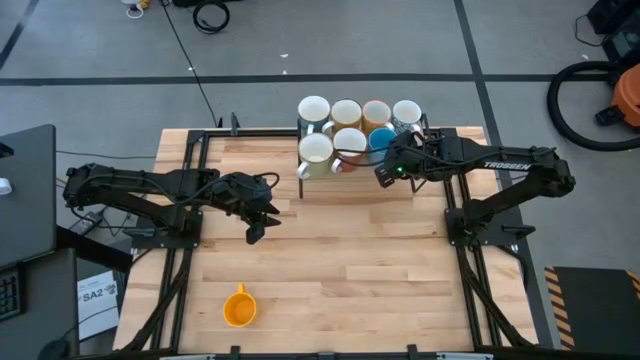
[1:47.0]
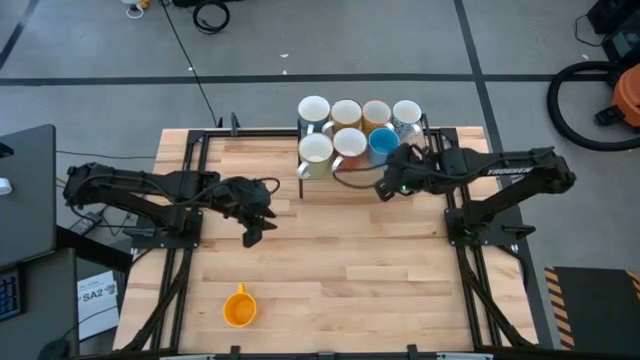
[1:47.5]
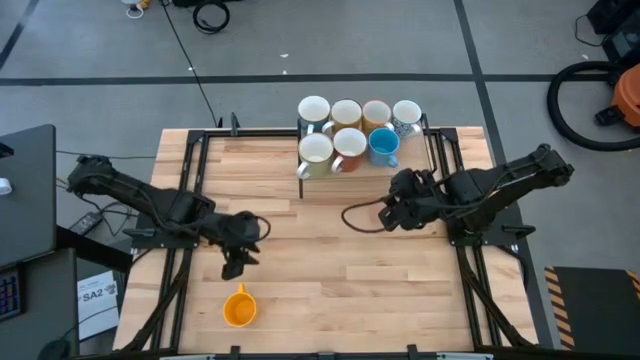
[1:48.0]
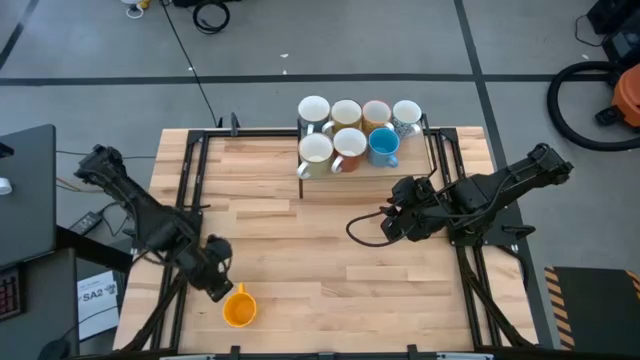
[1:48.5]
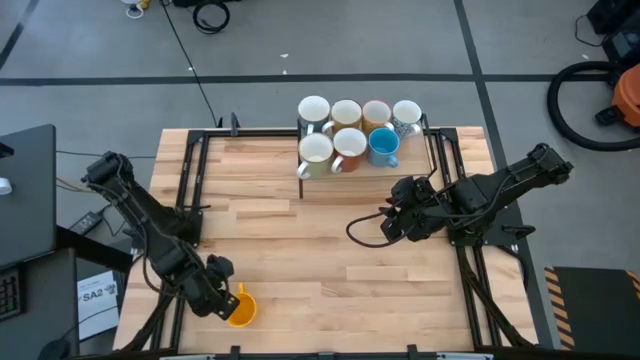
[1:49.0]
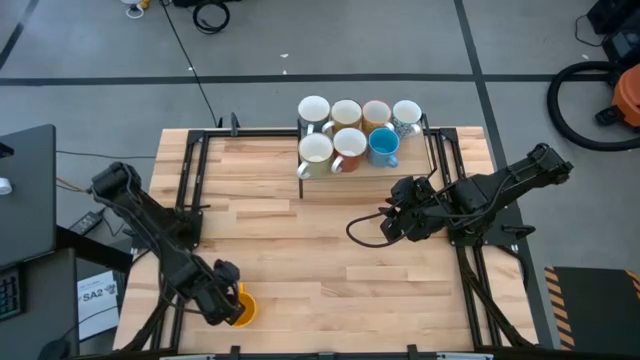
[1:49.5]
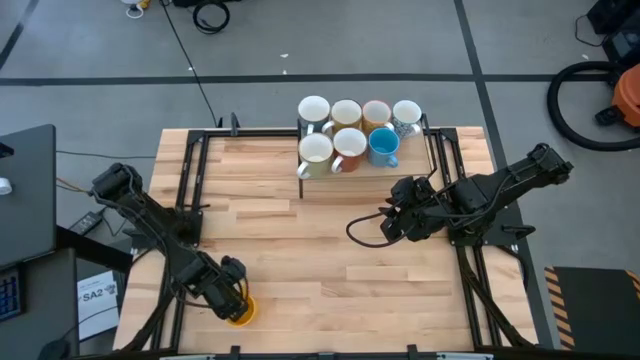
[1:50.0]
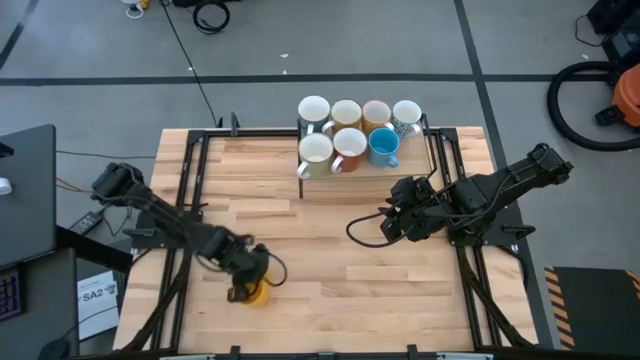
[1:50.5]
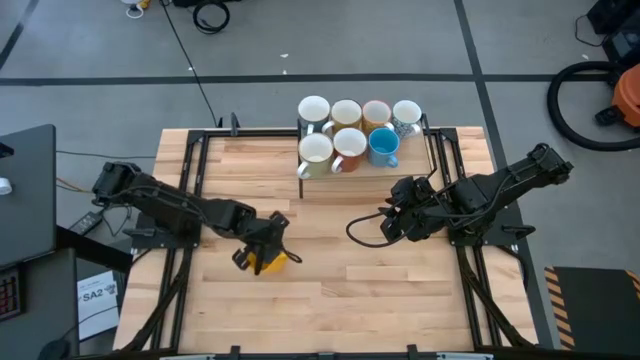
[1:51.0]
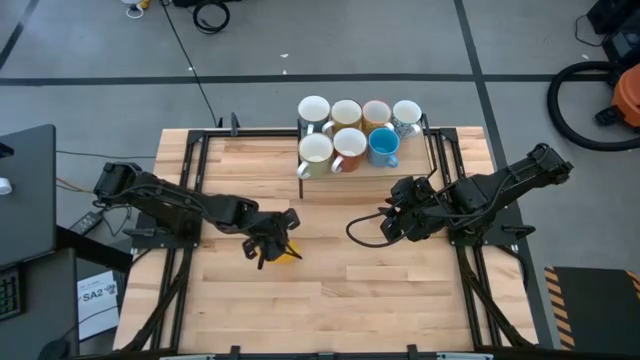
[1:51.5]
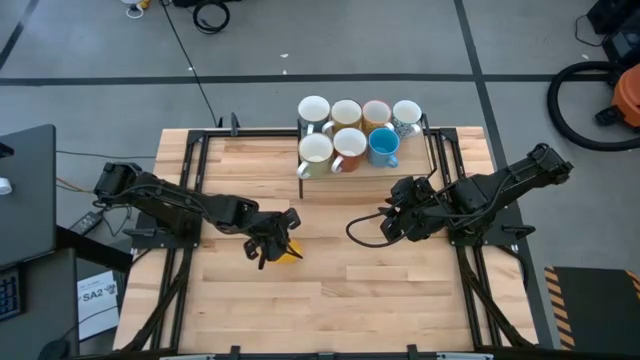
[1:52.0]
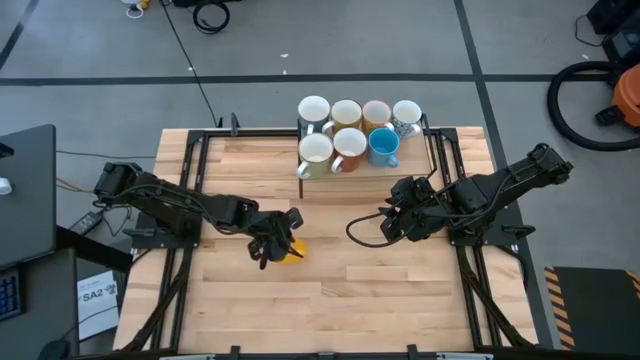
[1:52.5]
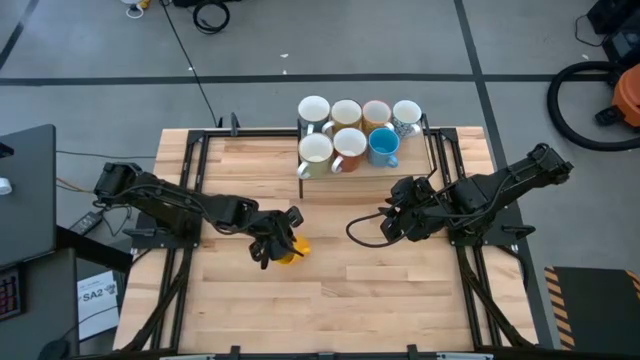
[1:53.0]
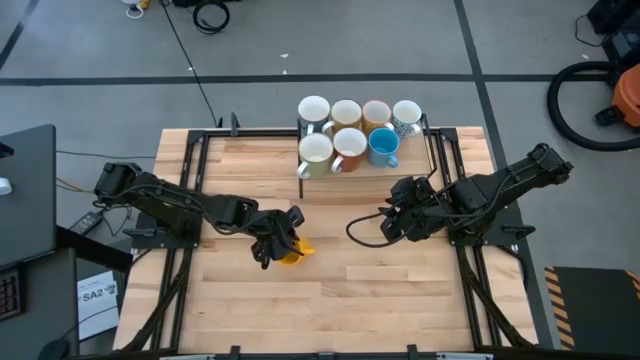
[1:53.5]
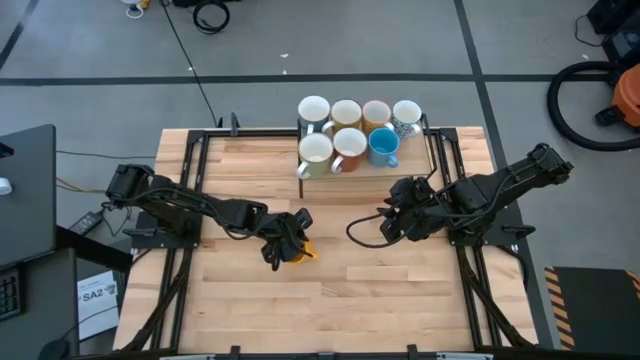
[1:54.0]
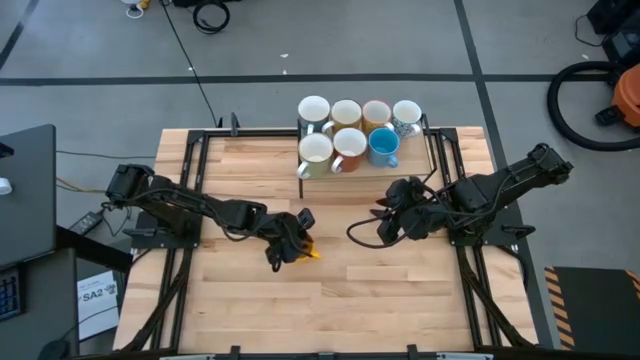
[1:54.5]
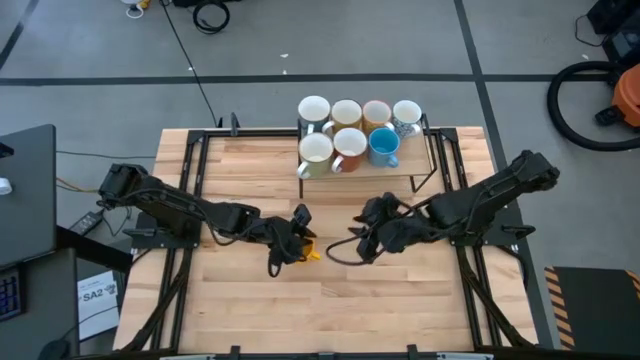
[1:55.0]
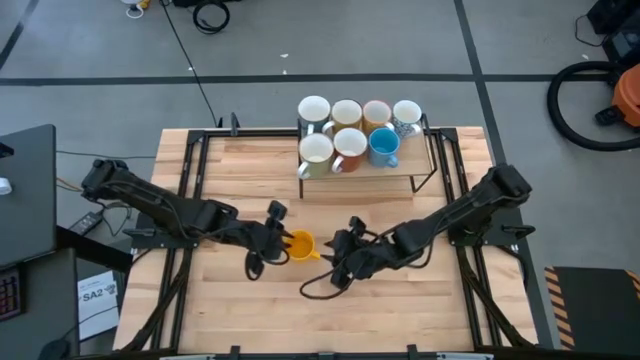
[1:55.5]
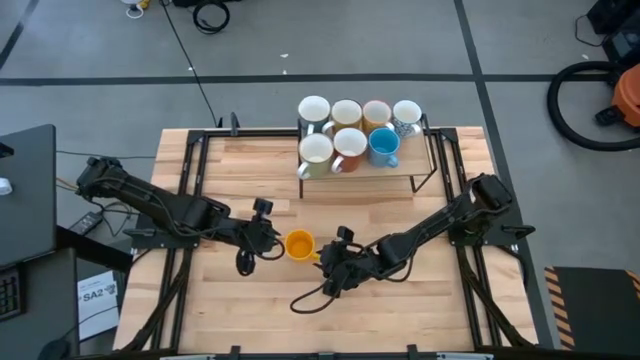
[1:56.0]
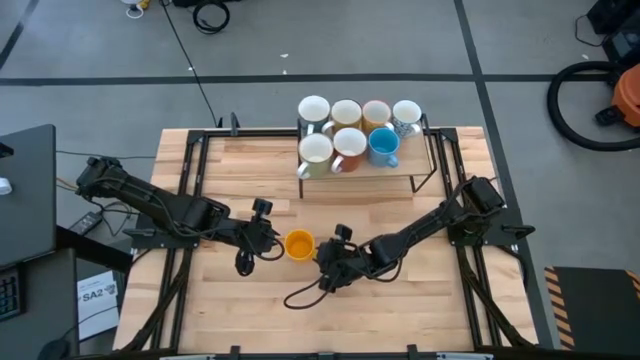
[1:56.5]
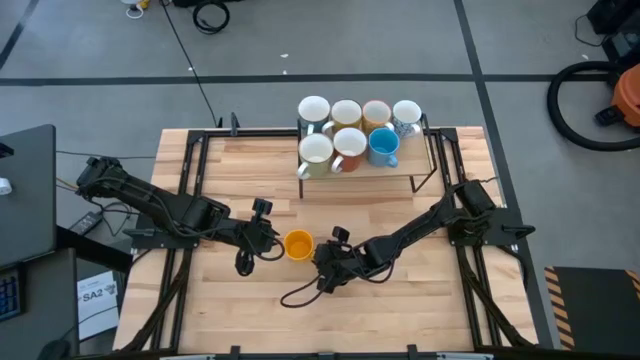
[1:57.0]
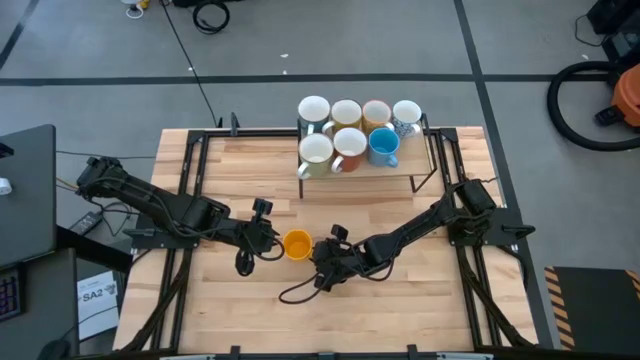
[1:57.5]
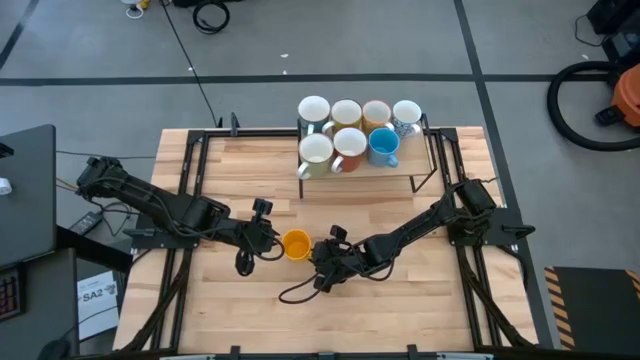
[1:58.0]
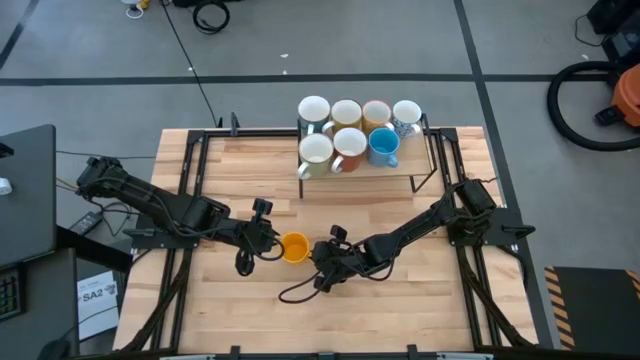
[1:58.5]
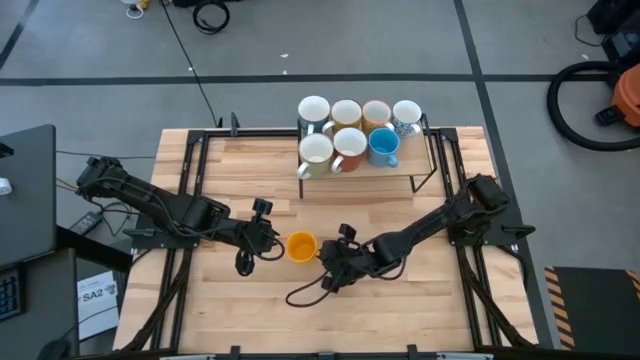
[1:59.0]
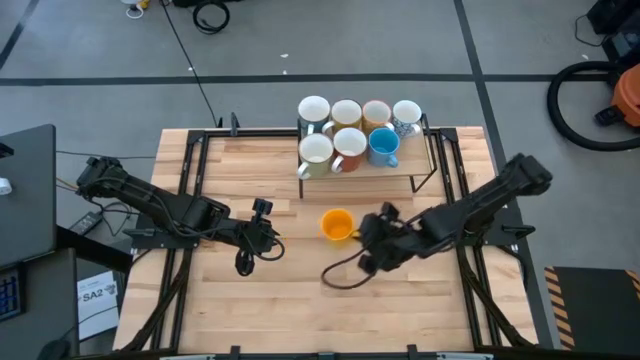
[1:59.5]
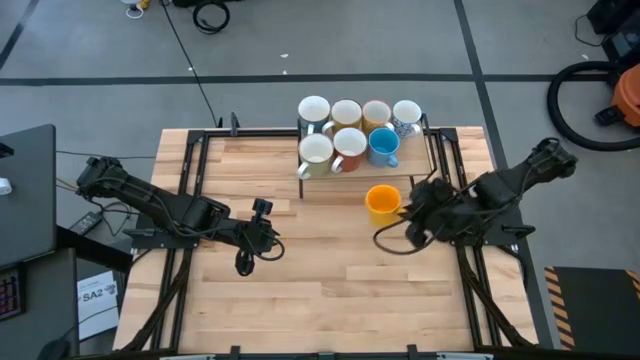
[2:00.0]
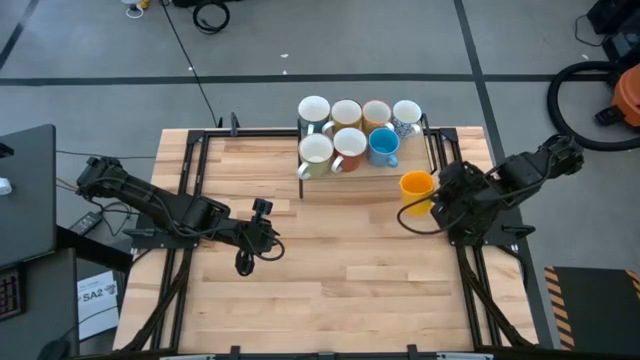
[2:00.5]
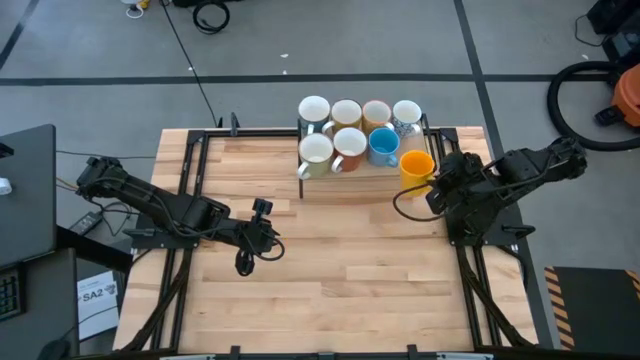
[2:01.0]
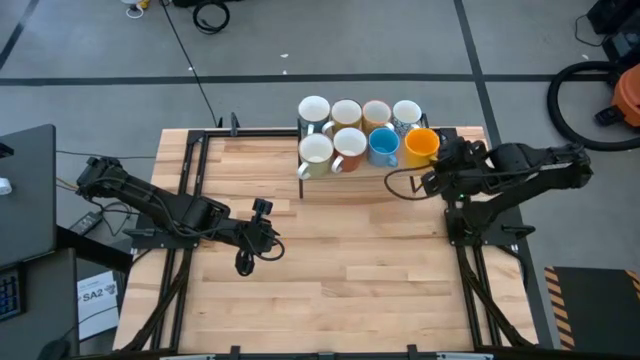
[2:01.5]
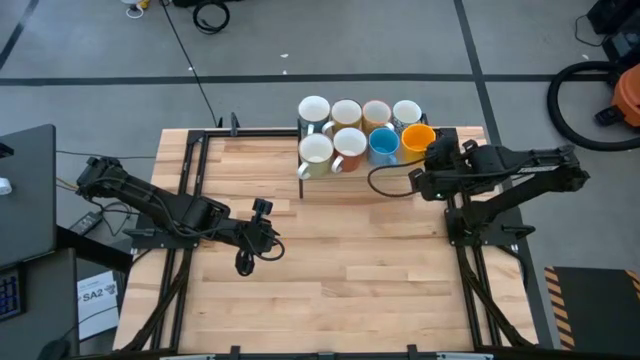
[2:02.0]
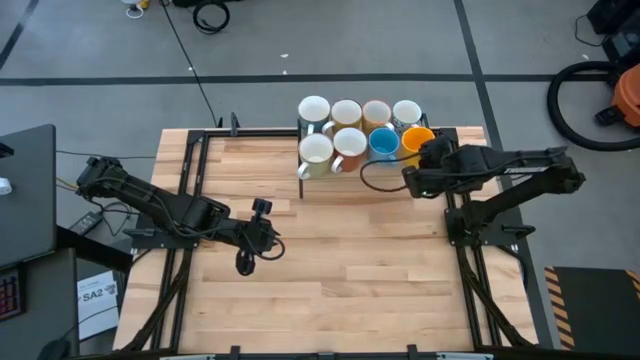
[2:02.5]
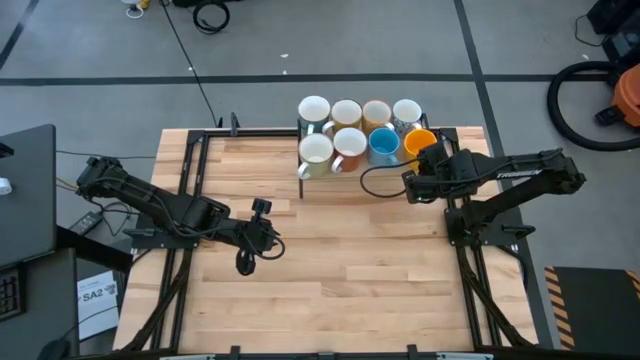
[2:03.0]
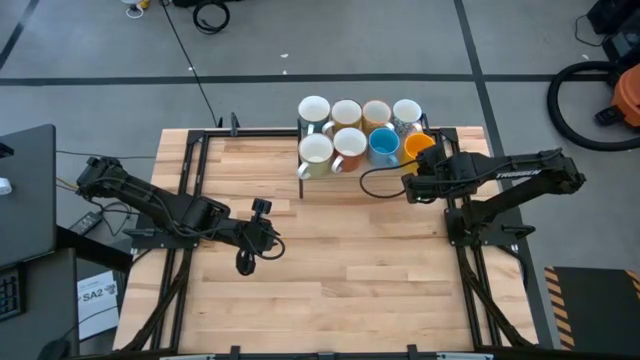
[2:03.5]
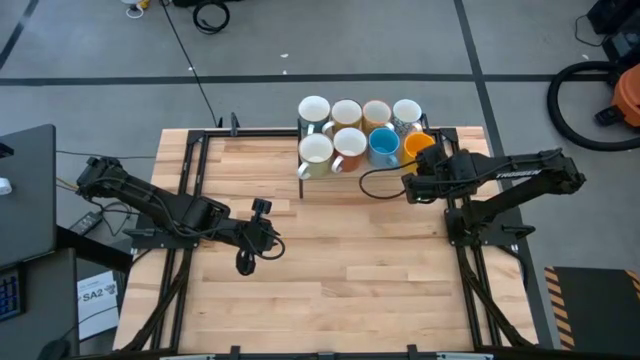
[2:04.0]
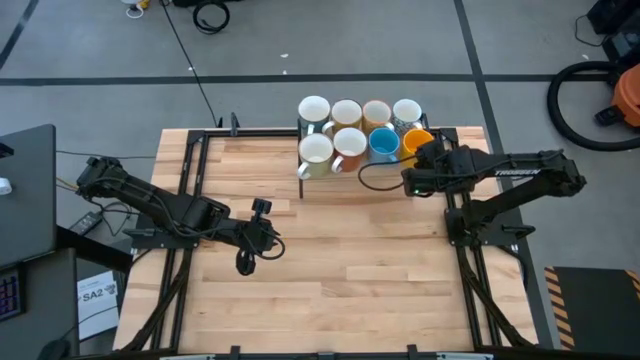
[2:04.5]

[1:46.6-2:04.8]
Task: Place coffee mugs
Put the yellow mug on the shelf

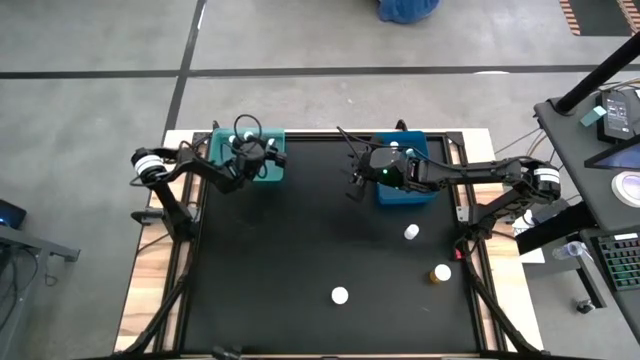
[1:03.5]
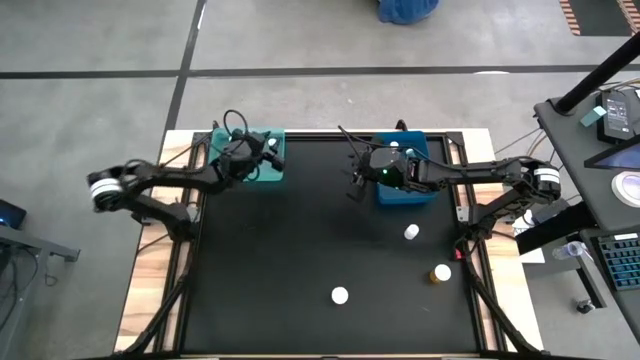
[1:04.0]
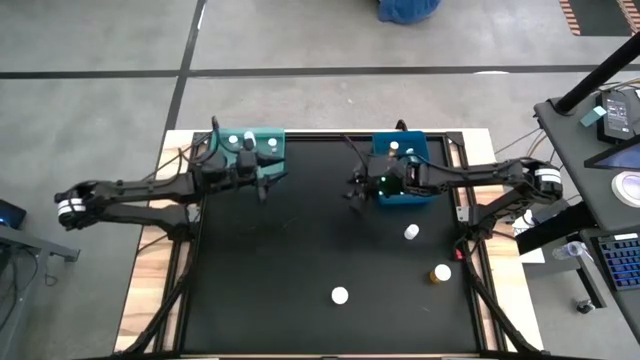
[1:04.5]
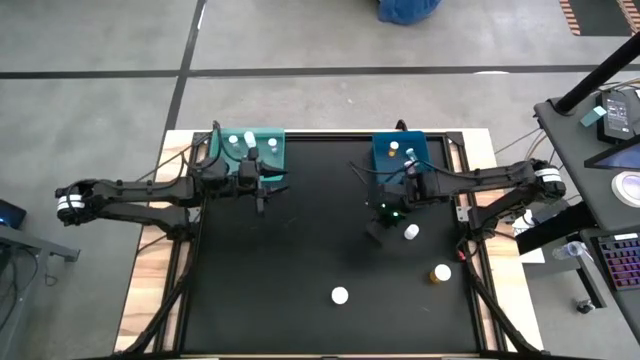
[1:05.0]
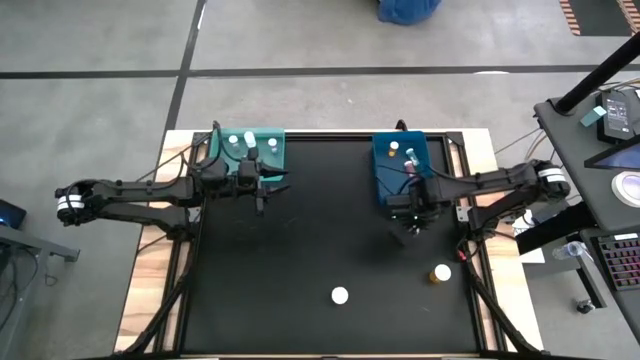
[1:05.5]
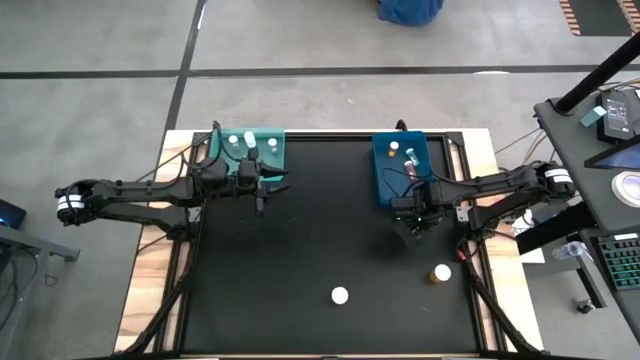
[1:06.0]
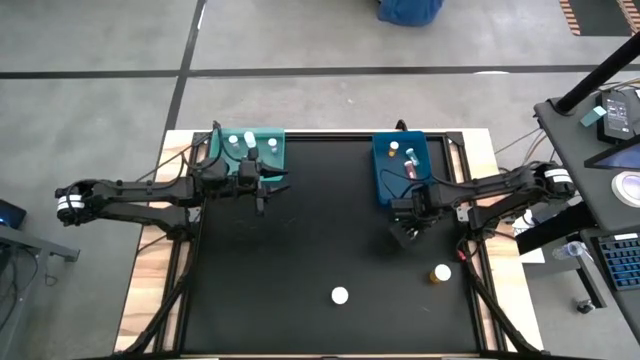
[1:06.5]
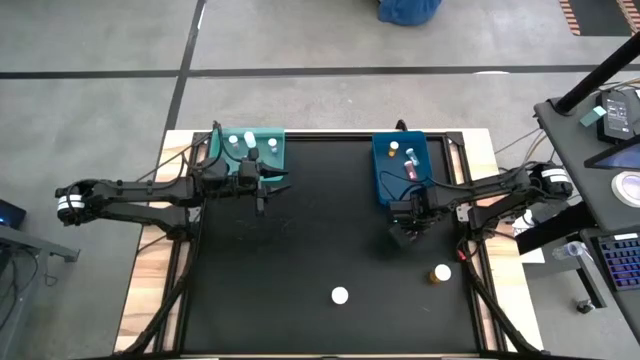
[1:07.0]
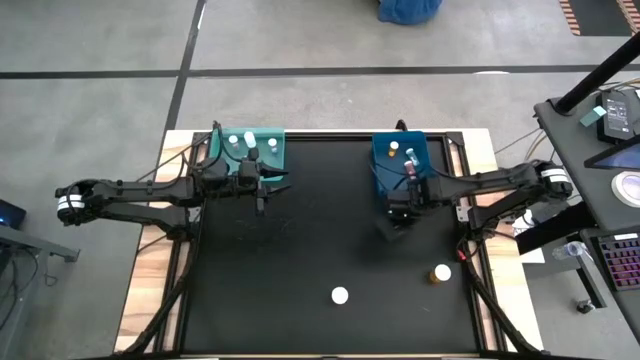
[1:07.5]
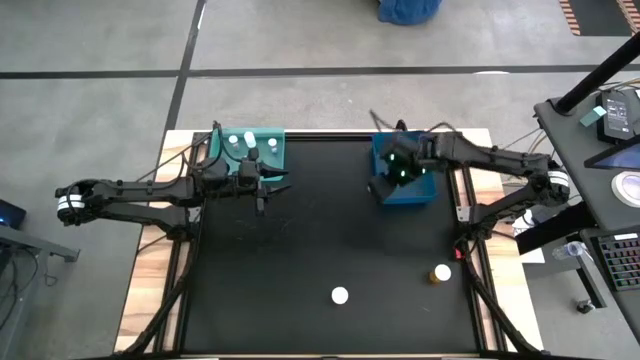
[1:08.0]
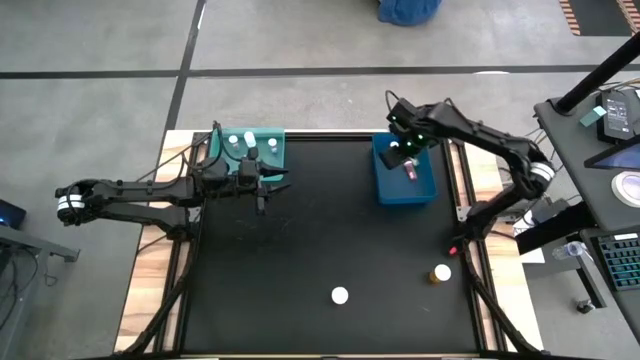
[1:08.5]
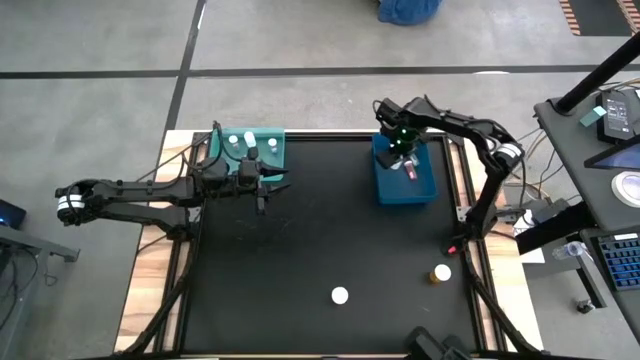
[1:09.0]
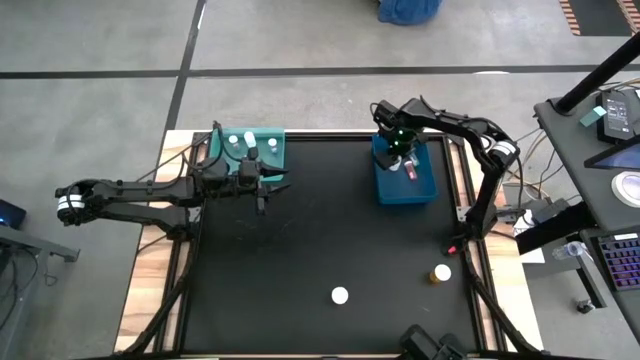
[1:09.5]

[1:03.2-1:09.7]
Task: Pick and place medicine bottles into bin by pill shape (circle, oval)
Put the white tablet bottle into the blue bin
